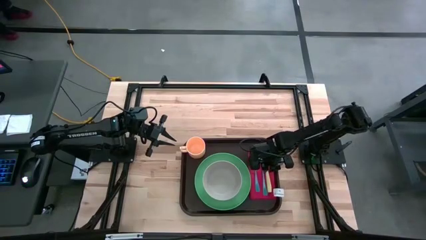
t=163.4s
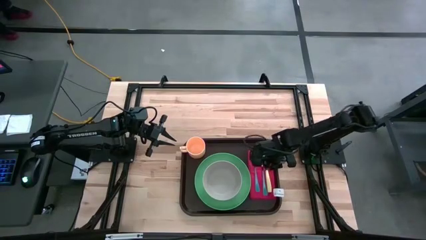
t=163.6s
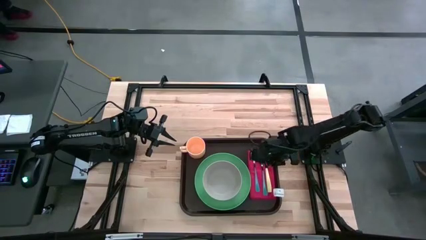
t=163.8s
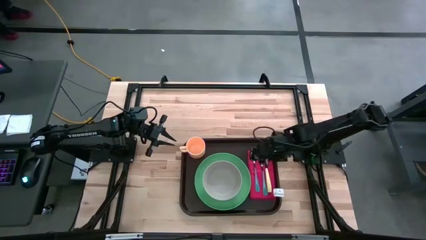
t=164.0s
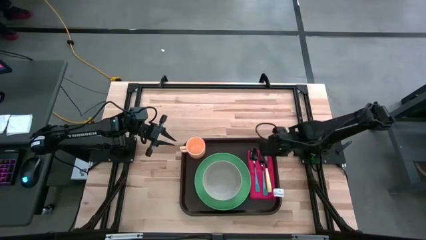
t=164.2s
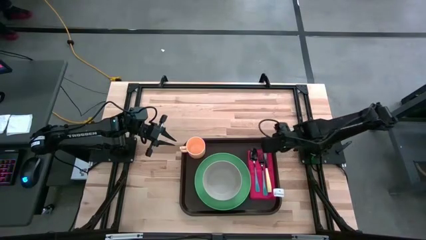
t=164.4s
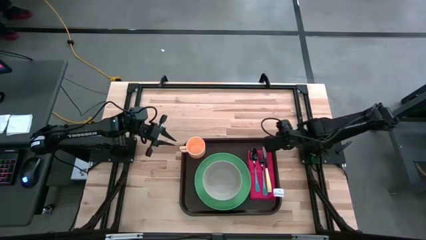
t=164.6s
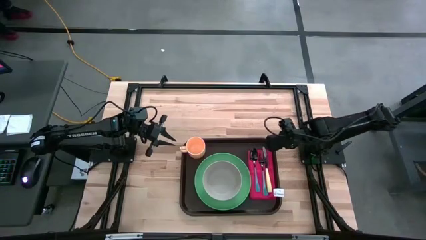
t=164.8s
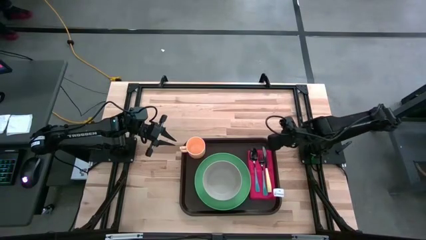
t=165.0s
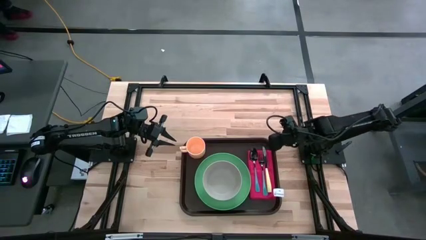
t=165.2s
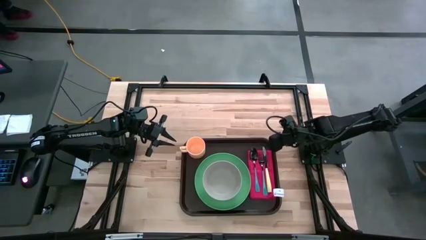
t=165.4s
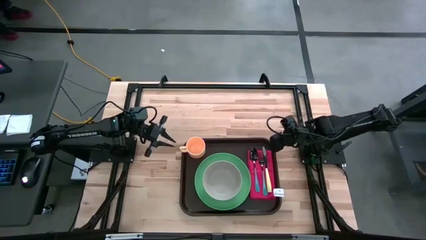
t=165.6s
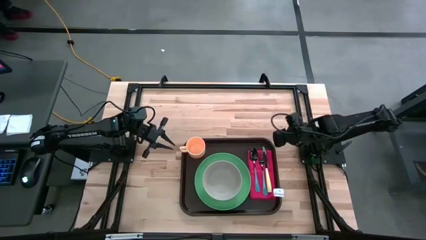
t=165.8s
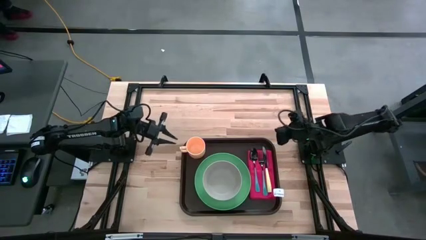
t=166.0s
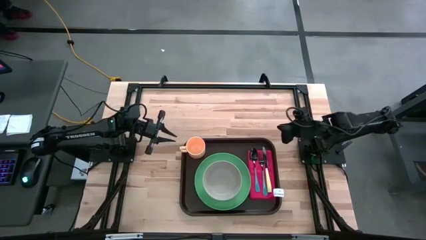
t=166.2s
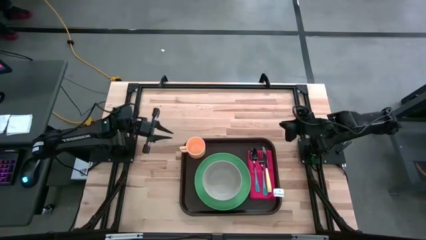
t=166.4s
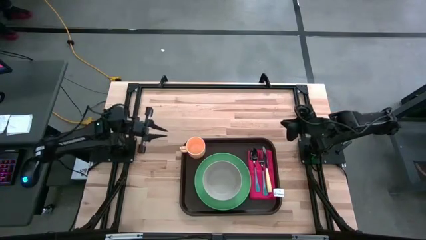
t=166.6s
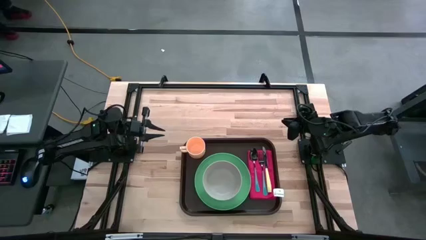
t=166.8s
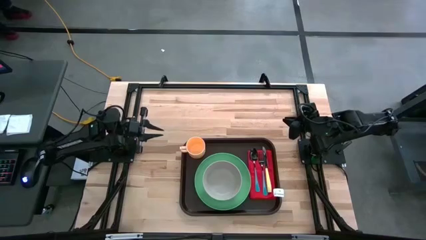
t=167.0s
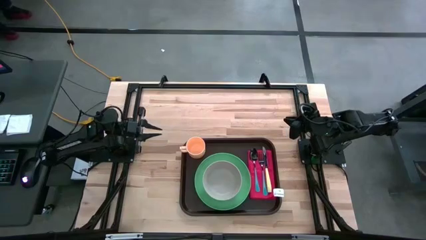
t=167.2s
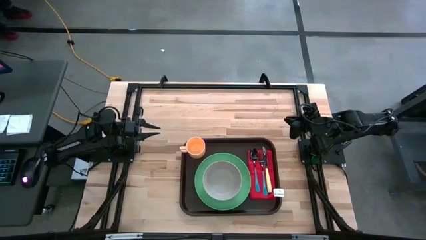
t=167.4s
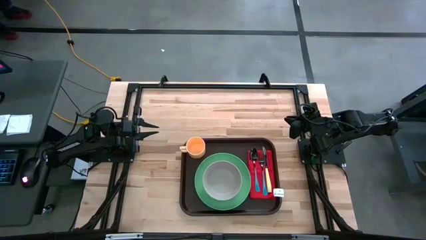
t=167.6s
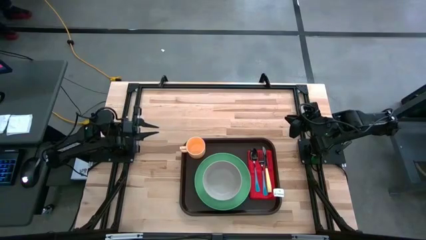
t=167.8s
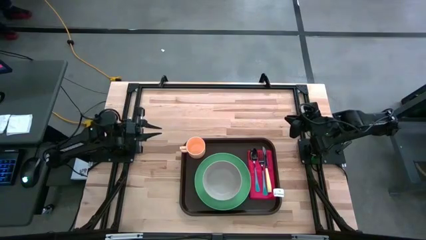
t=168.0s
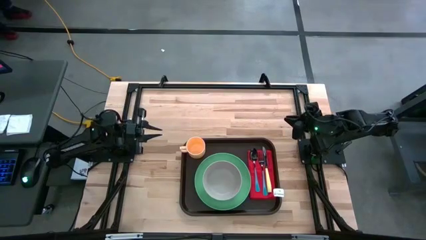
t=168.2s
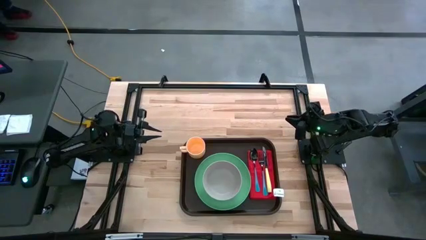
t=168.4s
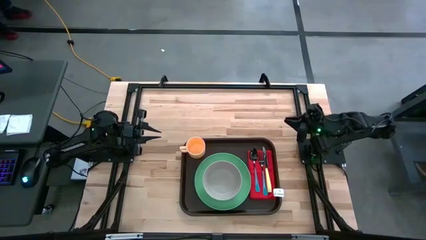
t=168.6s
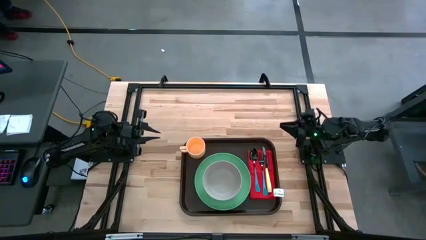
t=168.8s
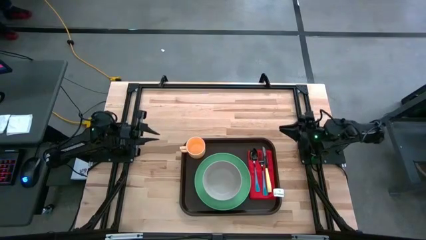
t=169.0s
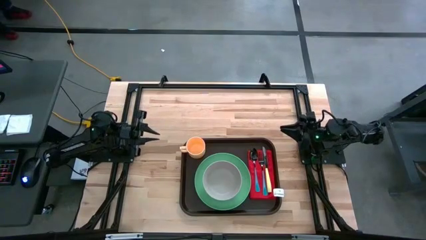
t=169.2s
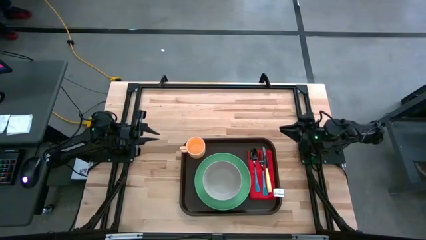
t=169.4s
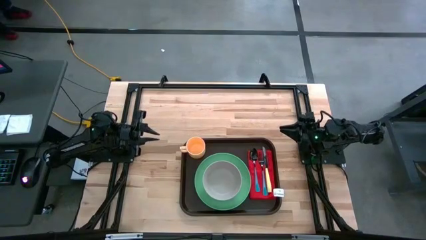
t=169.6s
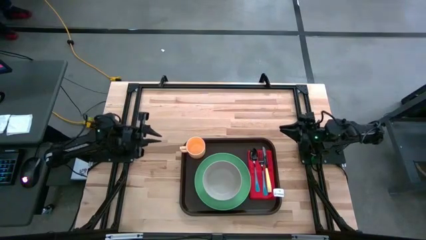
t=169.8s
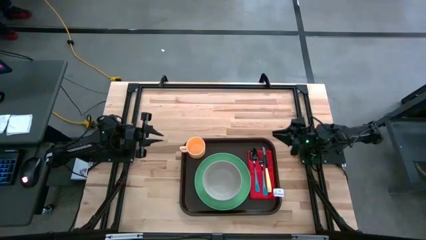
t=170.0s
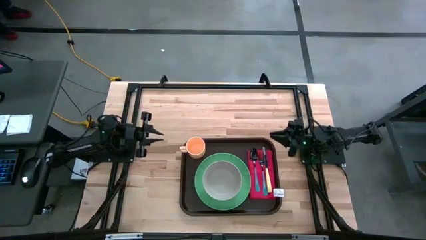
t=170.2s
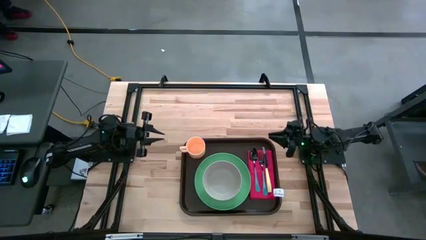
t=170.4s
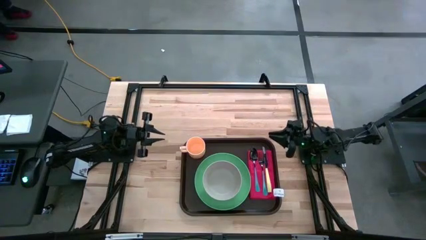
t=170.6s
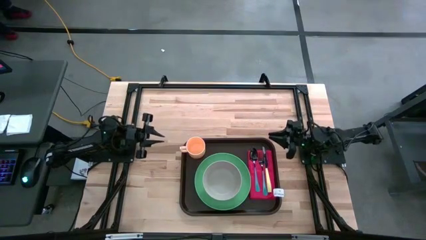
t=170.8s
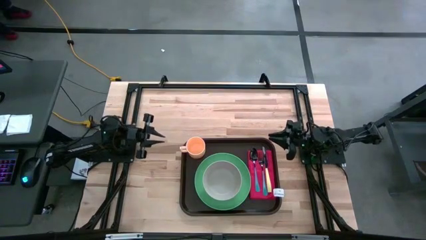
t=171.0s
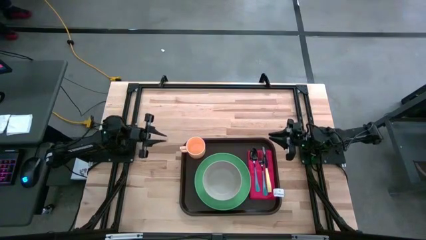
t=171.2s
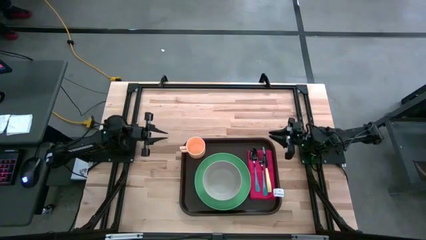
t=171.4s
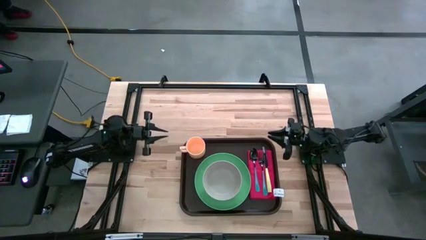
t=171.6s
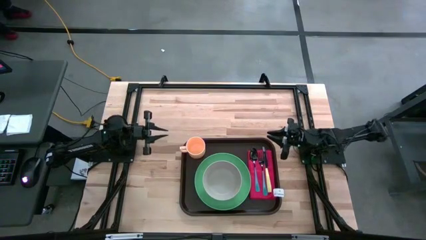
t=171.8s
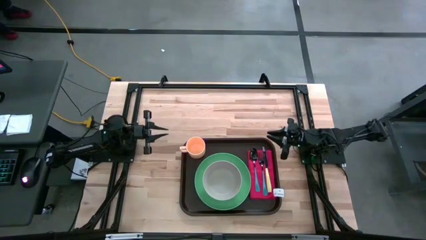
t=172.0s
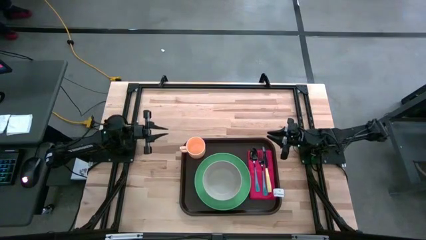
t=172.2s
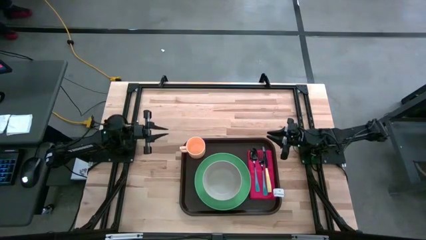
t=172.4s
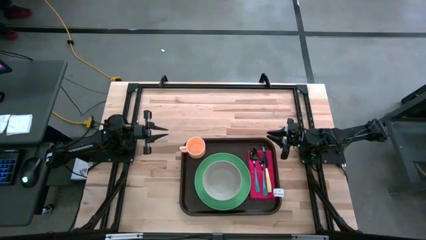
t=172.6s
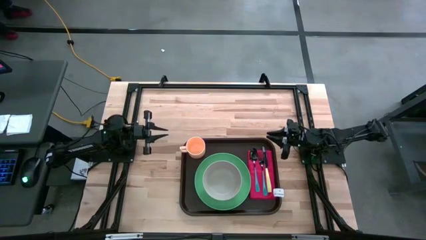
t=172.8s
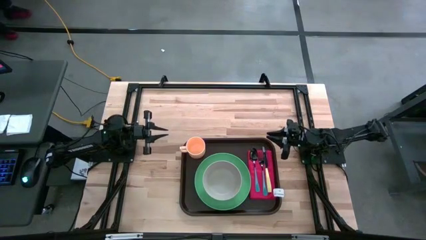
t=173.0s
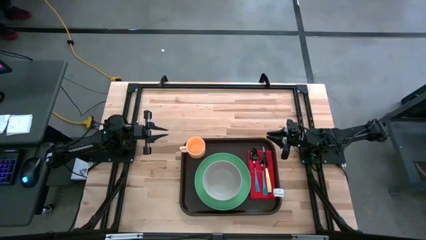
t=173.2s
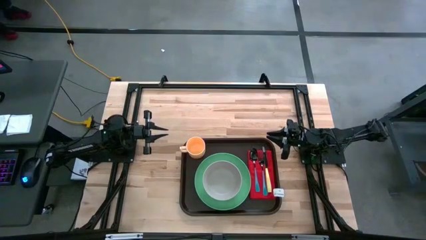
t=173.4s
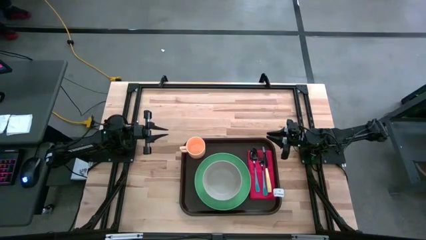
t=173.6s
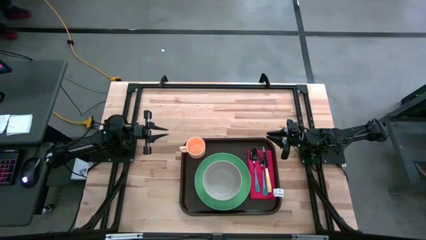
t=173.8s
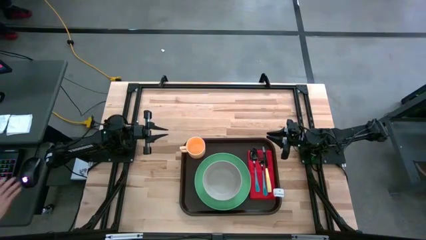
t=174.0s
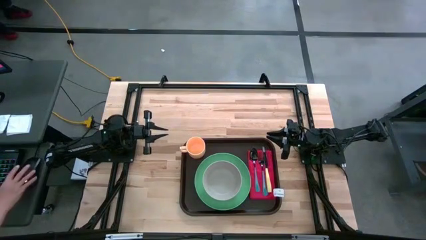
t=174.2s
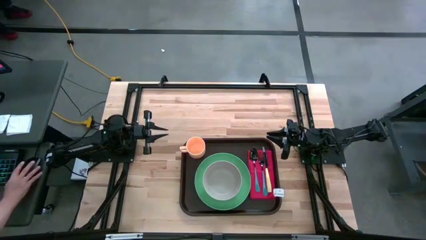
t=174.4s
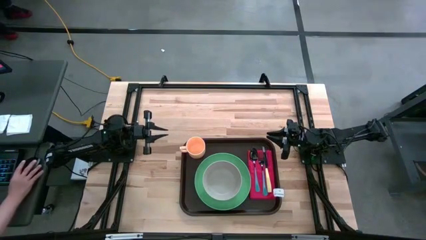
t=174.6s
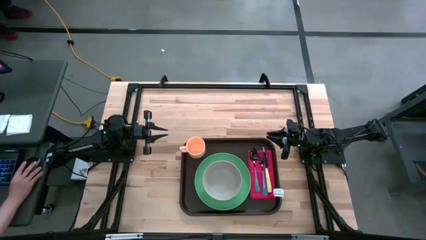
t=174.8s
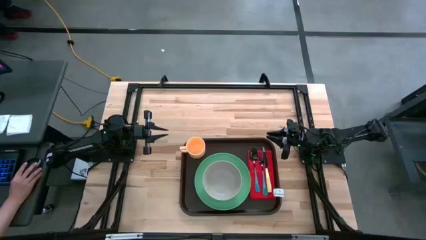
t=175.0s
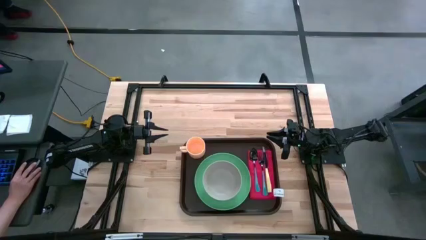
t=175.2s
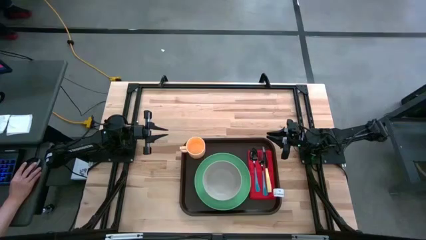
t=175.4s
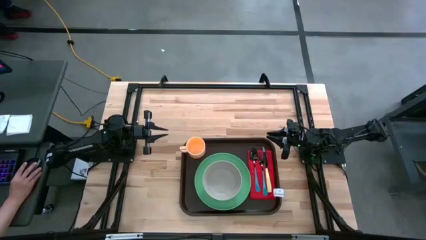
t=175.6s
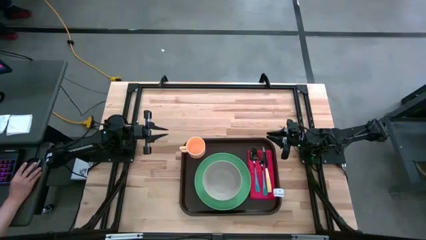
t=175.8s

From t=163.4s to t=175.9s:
Task: Set up tray
Return to Home Position

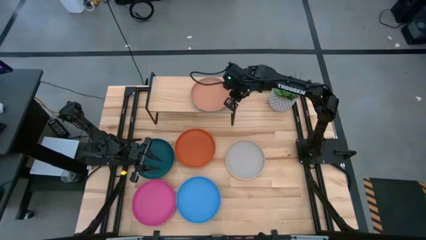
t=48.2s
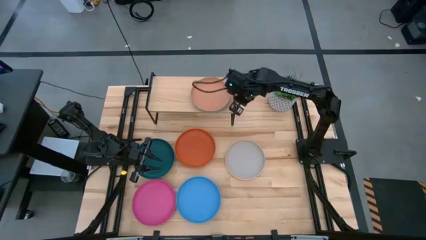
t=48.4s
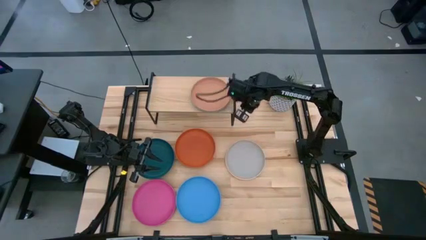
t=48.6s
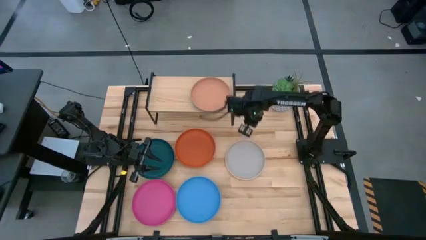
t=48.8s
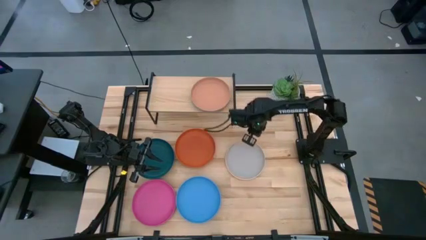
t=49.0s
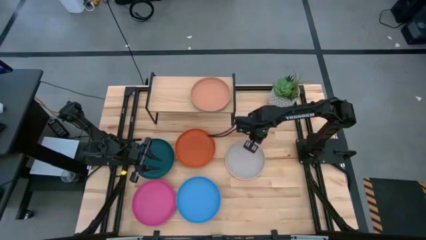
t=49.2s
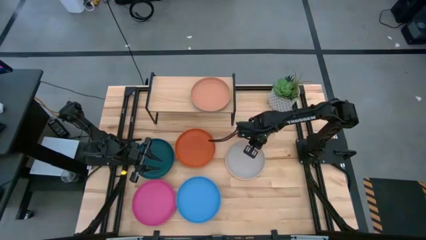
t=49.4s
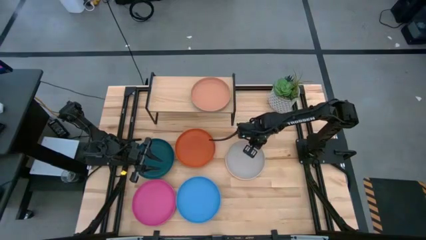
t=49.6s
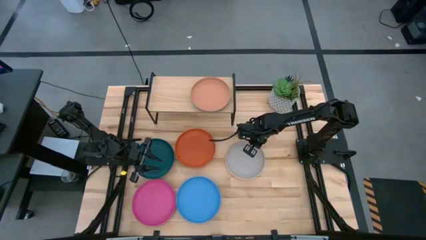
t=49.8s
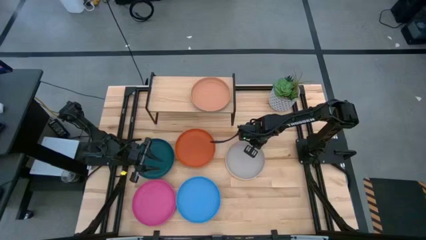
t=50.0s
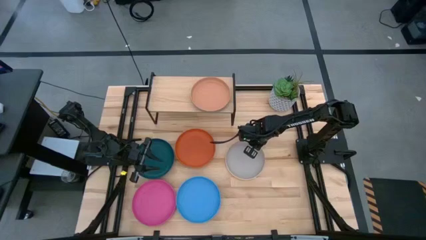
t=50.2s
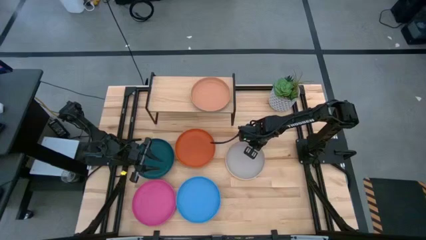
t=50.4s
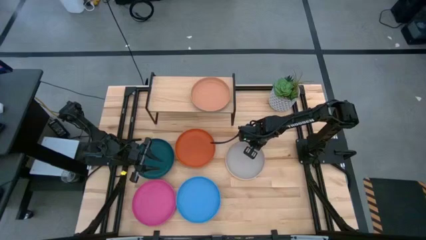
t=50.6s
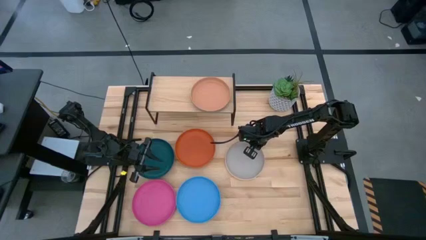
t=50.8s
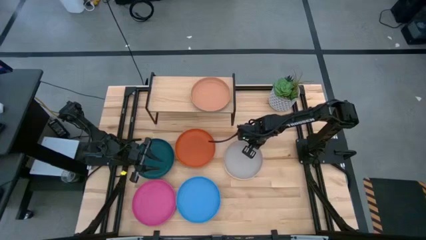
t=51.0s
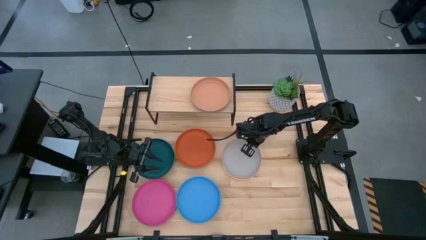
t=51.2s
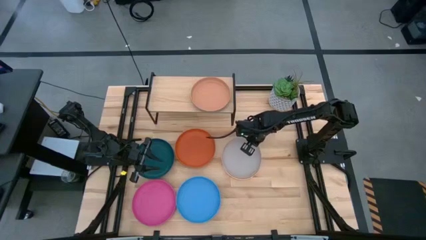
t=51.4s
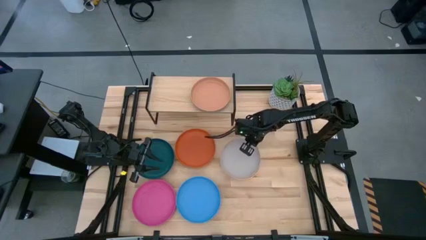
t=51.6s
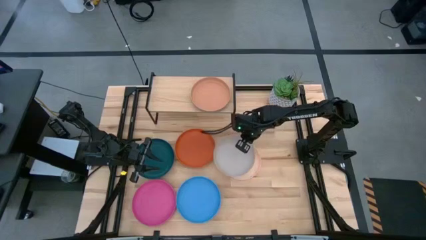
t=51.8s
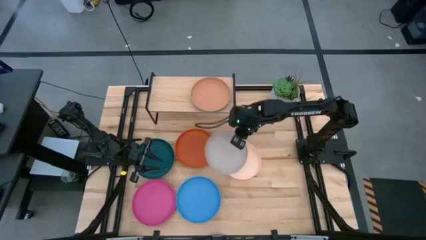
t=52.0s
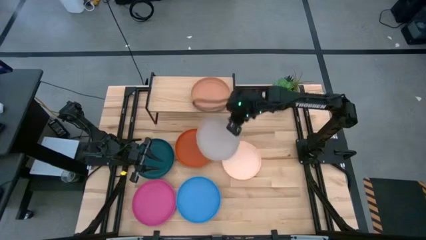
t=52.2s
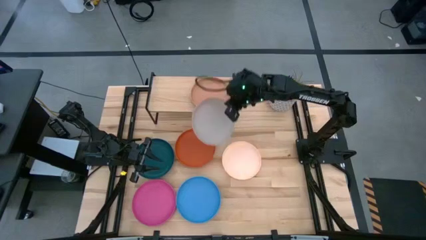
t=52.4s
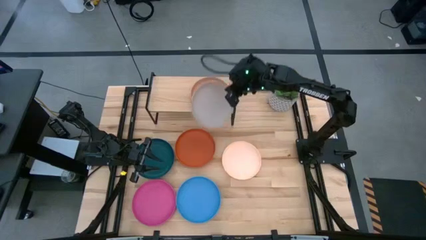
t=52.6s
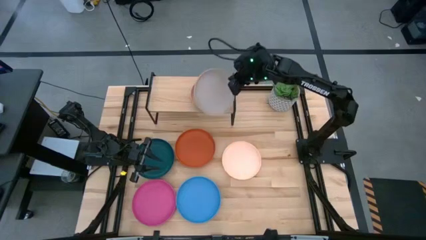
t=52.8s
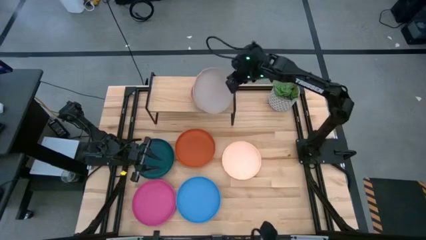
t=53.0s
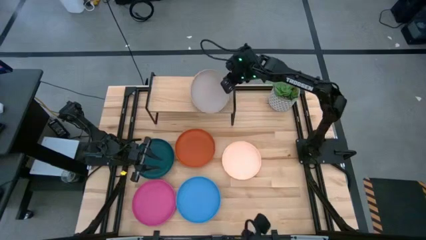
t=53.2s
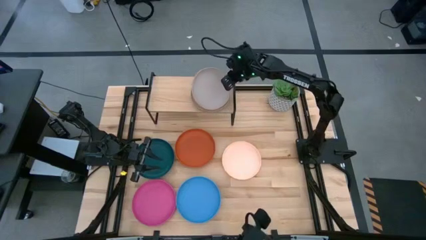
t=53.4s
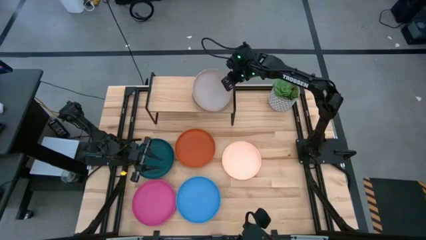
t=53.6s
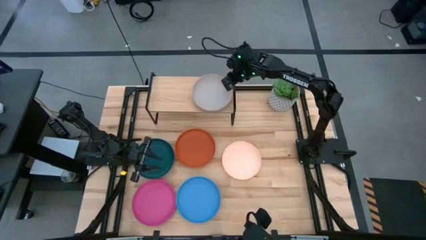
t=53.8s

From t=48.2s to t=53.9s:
Task: Place and stack plates onto a shelf
Stack the gray plate into the brown plate on the shelf
